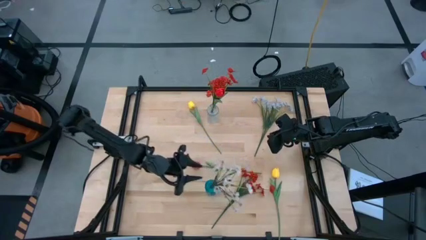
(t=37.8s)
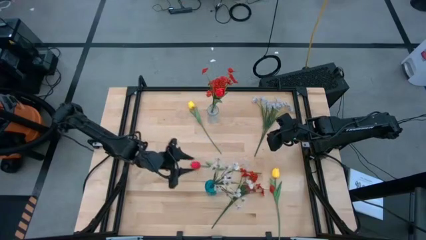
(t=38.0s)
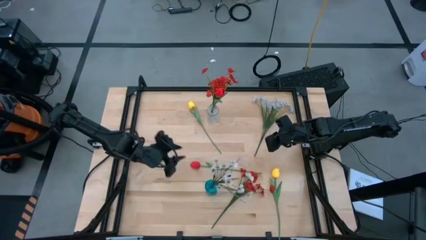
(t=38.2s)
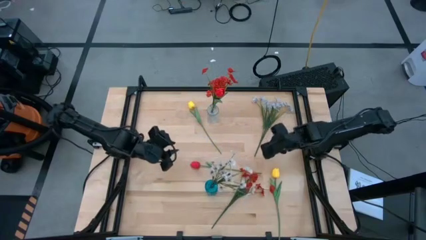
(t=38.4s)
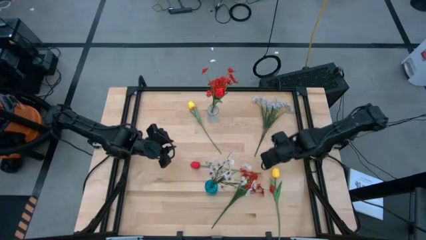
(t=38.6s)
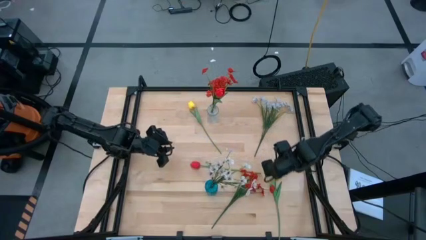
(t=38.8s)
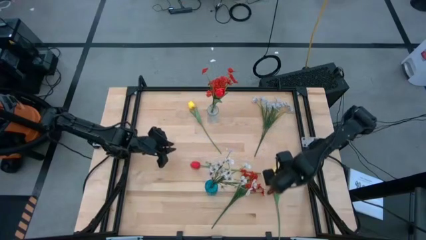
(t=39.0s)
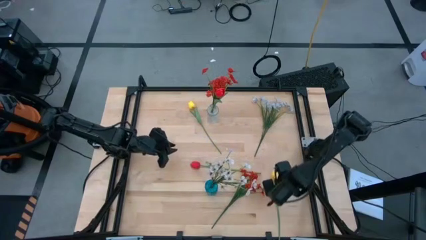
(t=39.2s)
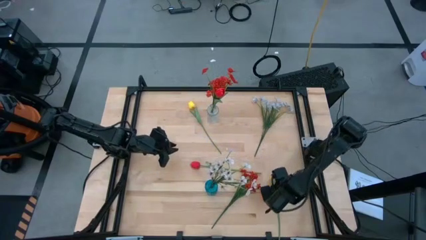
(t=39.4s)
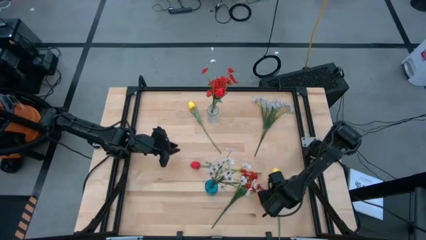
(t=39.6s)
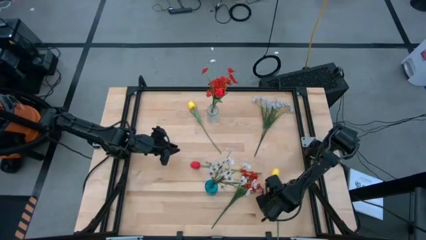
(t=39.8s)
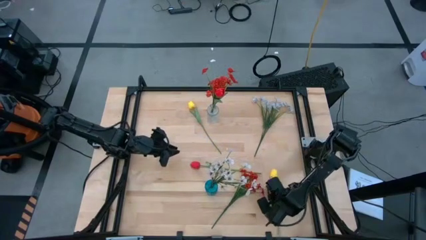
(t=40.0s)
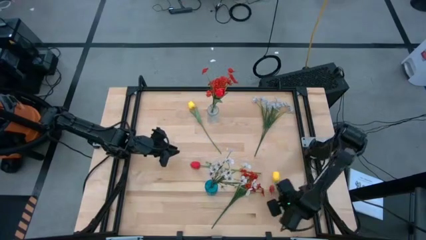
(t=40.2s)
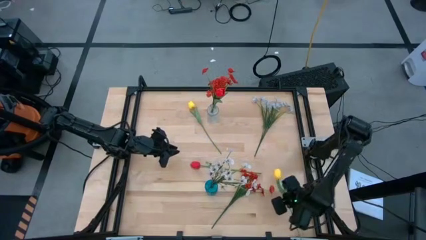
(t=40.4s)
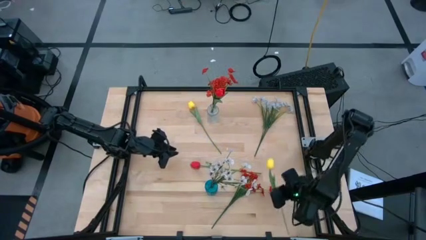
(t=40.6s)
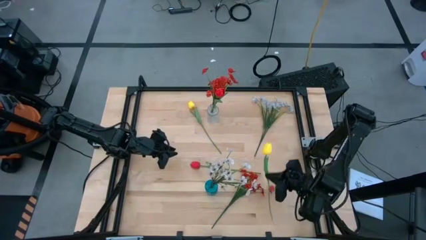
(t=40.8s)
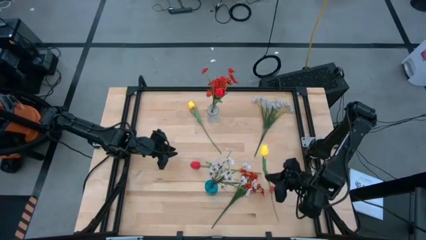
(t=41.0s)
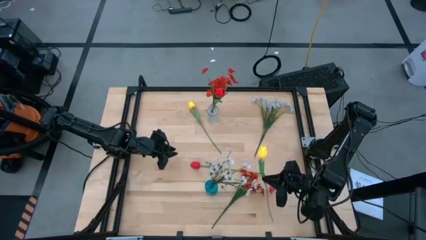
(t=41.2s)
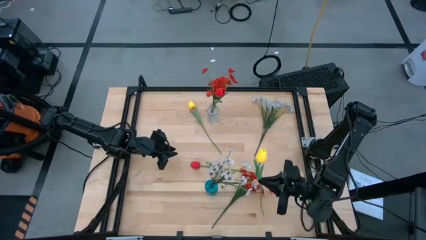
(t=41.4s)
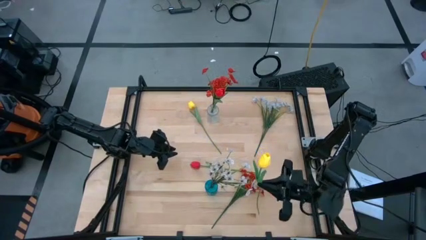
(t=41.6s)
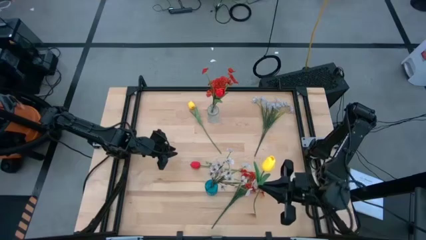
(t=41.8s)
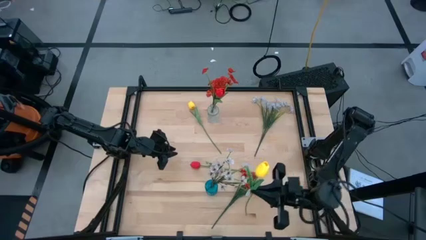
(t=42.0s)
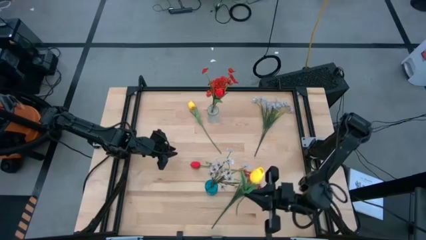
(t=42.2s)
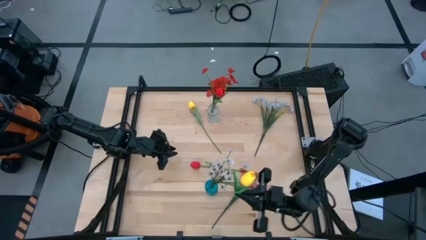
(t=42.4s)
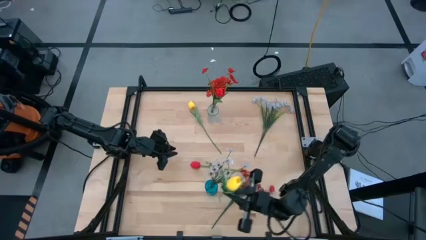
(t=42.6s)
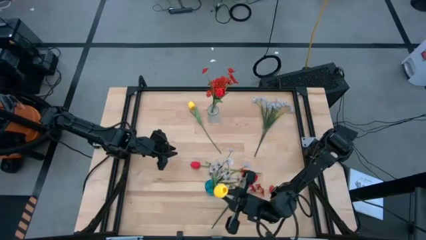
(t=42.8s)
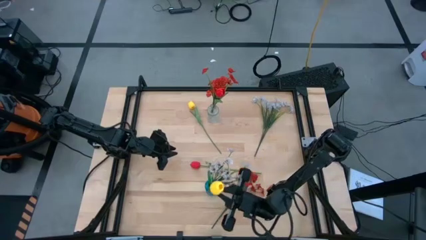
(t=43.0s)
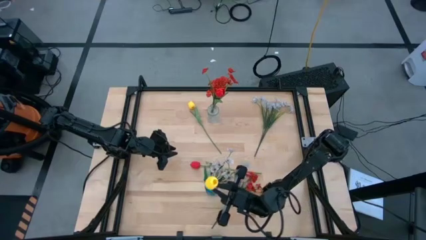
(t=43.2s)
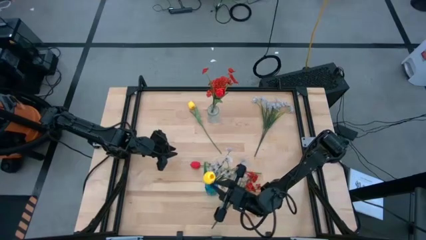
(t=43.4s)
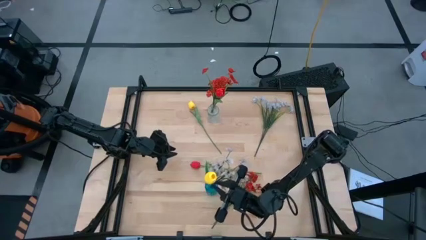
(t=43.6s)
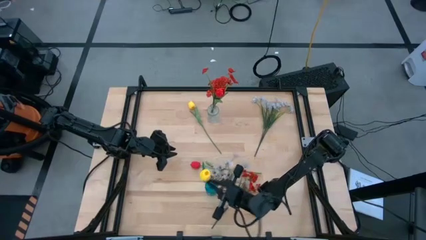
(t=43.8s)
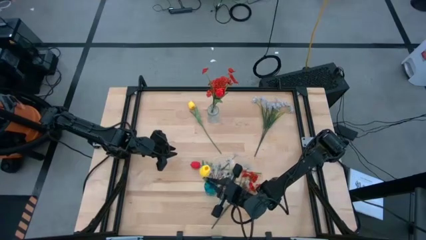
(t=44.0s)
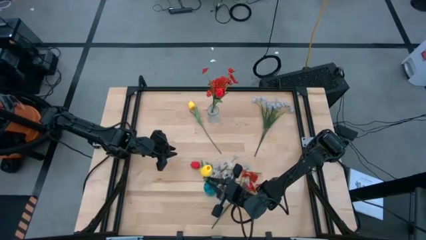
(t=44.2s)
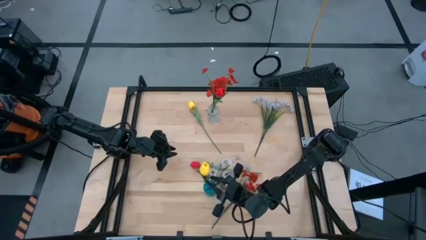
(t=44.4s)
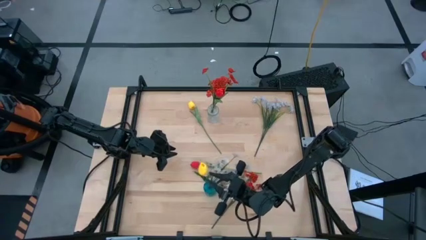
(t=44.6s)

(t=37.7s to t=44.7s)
Task: Sort flowers into vase by color
Put the bottom yellow flower into the blue vase

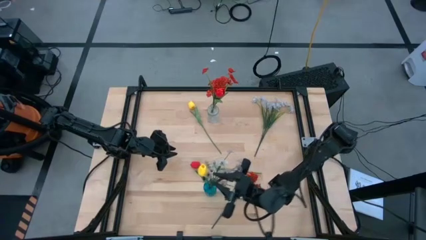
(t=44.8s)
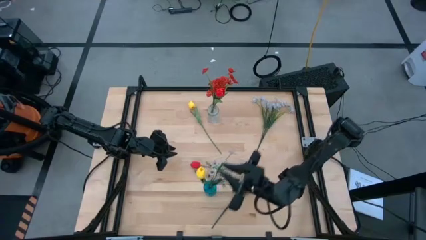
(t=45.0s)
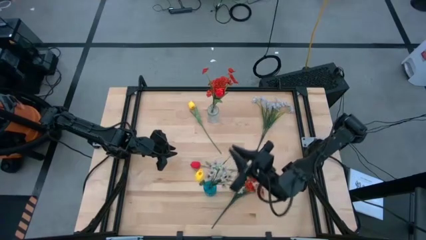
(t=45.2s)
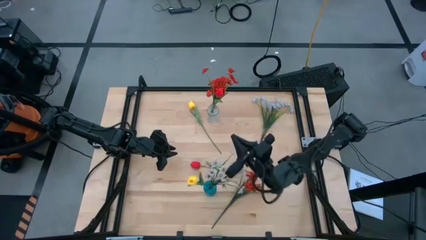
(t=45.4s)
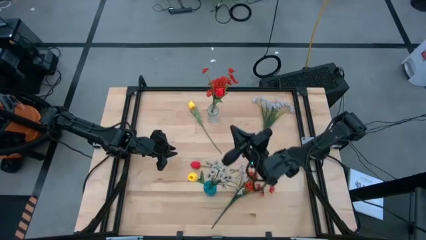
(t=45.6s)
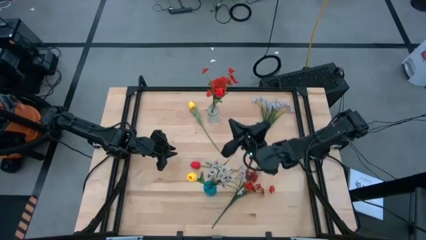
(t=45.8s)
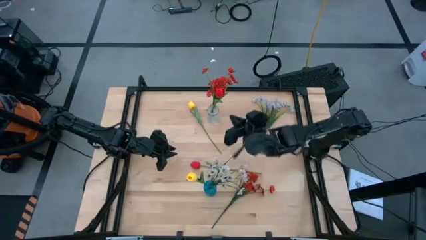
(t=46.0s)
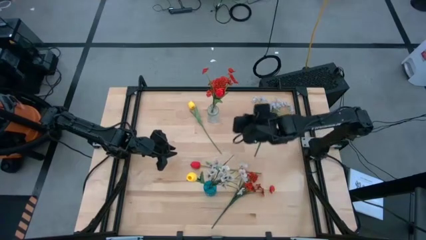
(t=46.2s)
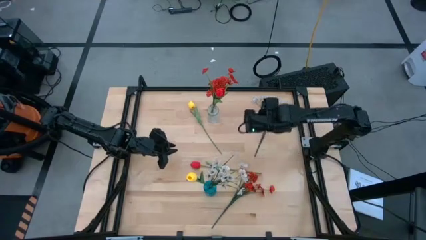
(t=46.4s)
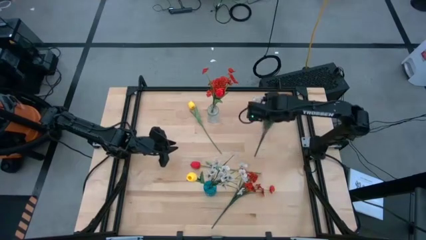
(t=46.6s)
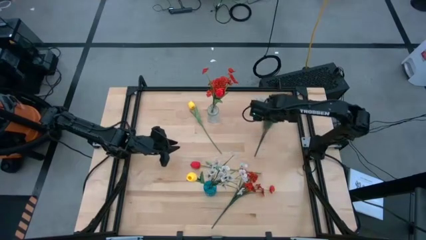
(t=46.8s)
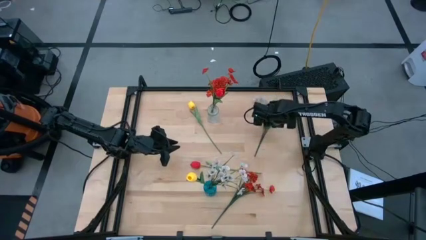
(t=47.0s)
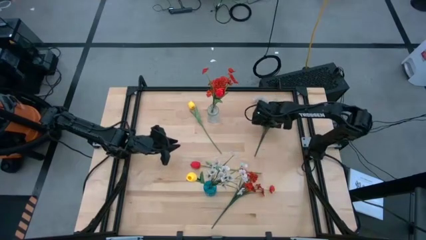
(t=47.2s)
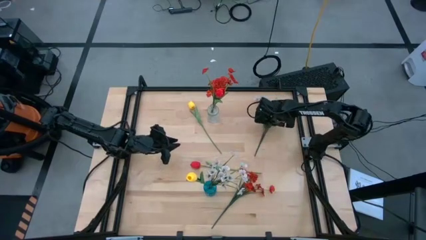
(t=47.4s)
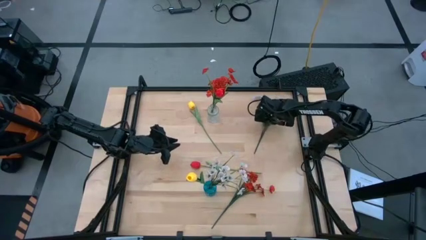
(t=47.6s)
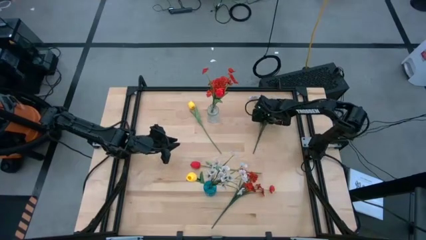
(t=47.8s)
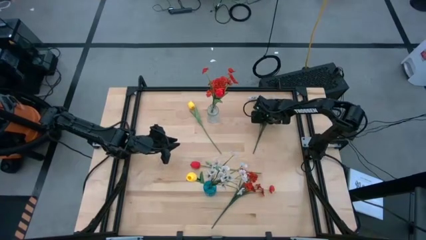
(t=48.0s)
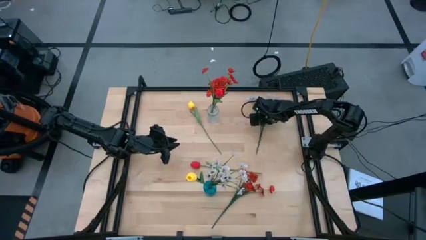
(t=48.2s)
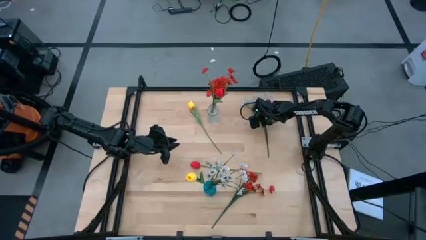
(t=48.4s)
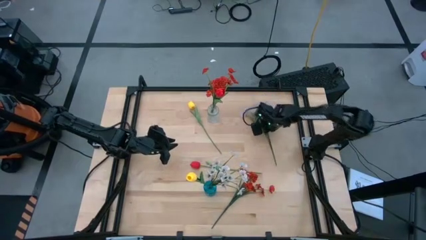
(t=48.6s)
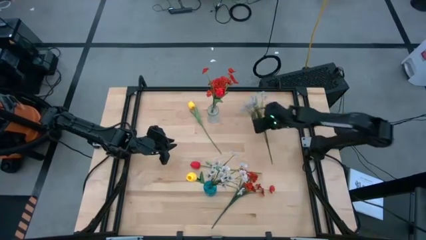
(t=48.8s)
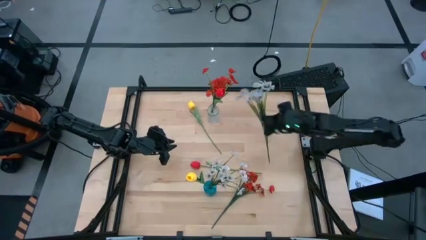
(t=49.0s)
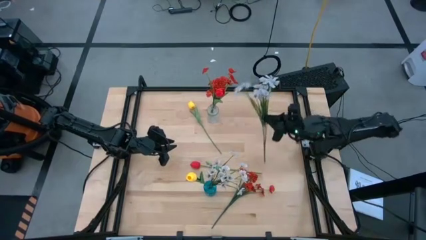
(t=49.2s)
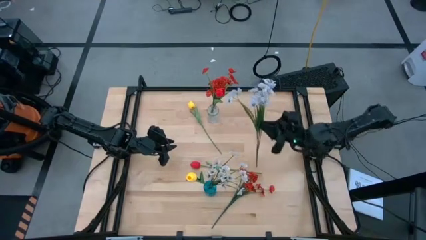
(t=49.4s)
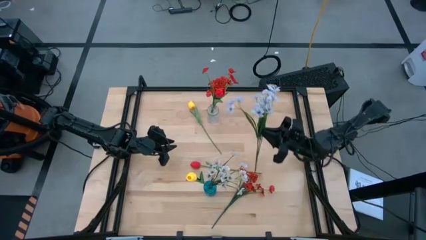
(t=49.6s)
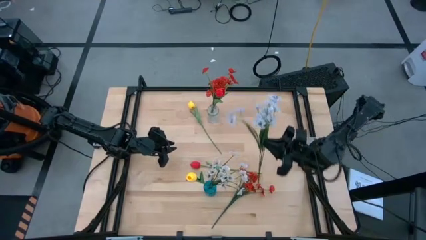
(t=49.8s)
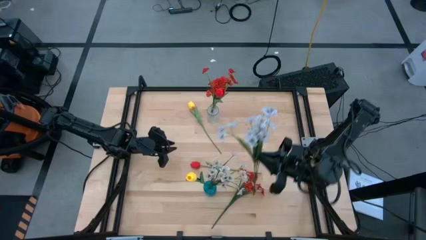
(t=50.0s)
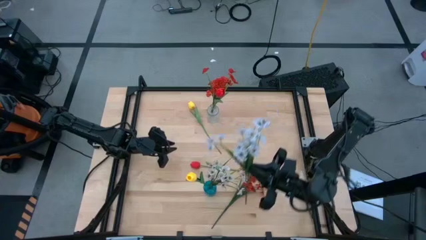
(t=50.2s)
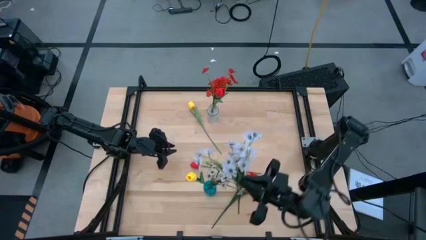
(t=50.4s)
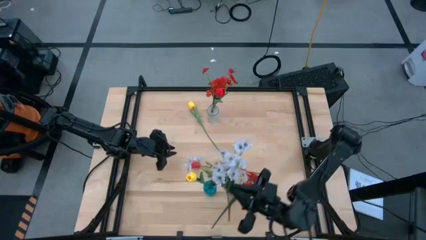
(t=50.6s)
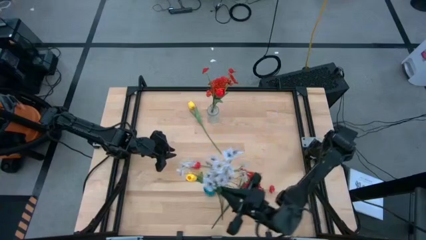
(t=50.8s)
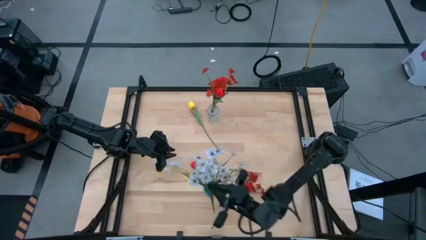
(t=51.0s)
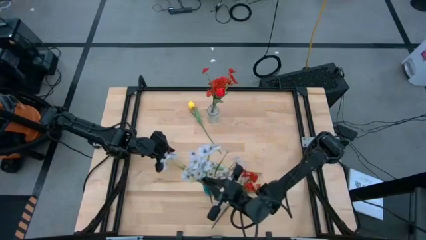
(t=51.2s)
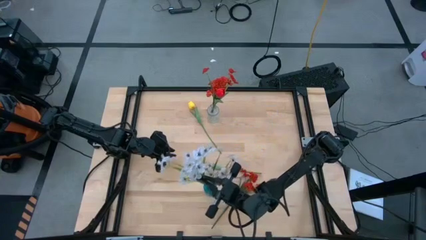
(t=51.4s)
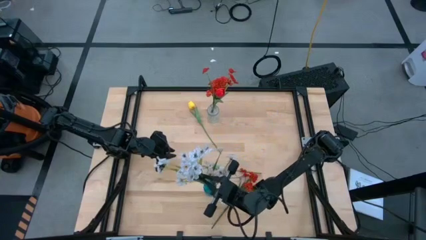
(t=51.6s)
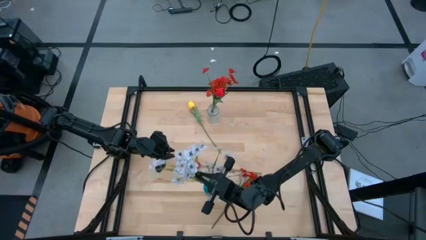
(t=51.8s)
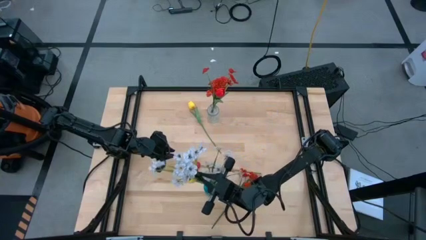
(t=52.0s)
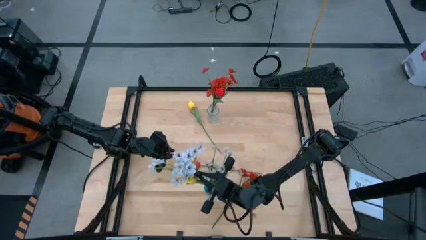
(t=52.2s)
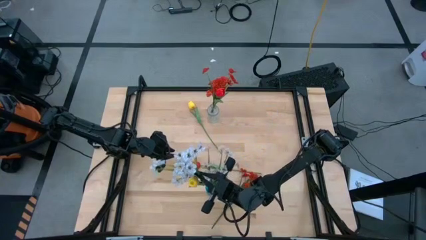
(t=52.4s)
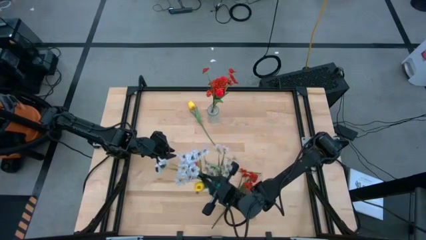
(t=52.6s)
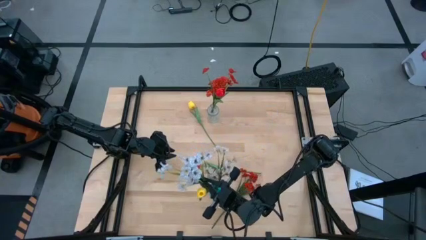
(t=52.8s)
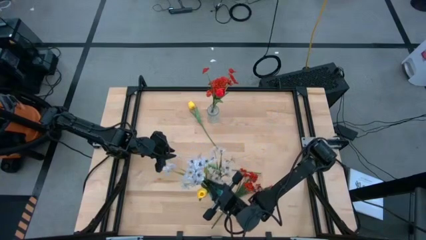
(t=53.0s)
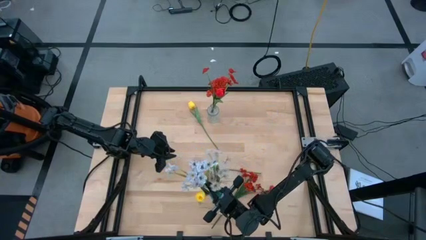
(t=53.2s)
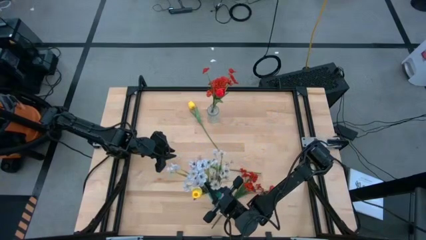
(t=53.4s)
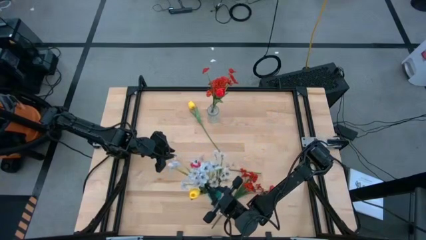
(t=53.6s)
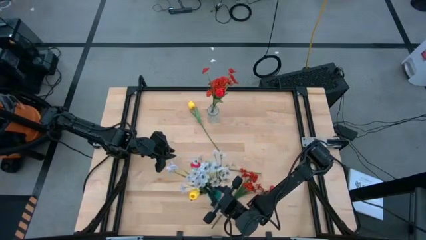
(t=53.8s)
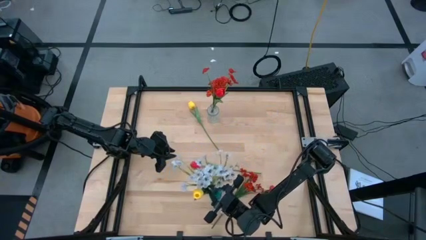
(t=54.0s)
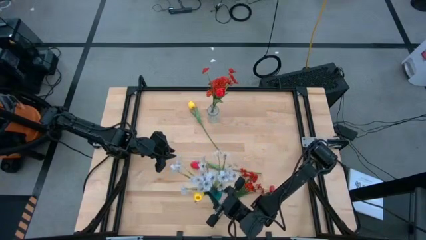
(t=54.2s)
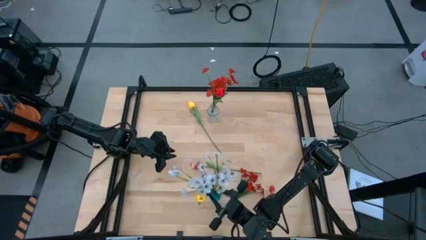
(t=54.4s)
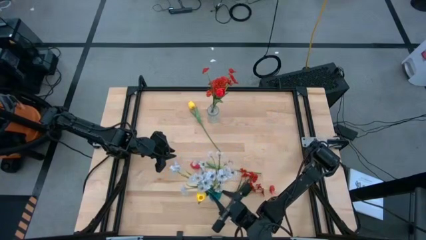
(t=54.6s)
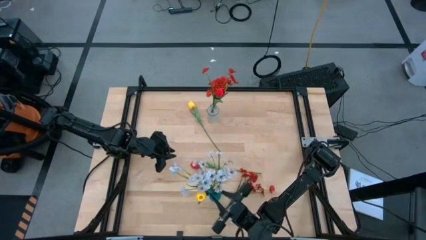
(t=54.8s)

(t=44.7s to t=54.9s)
Put the white flowers into the blue vase
